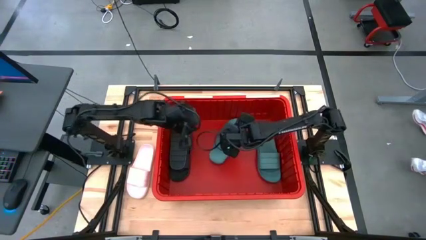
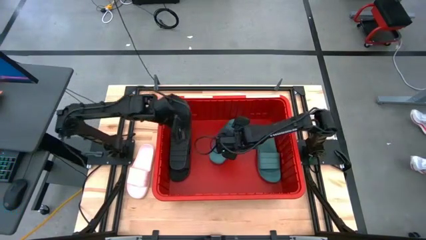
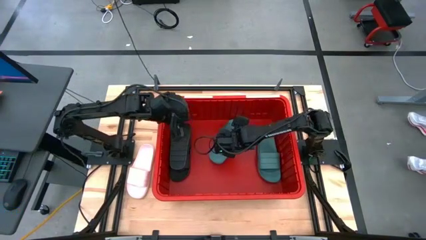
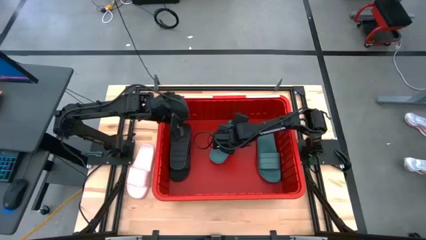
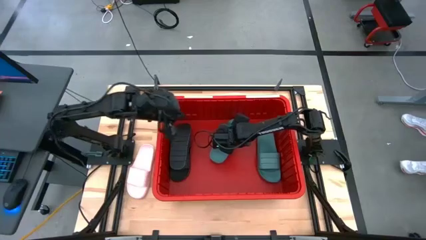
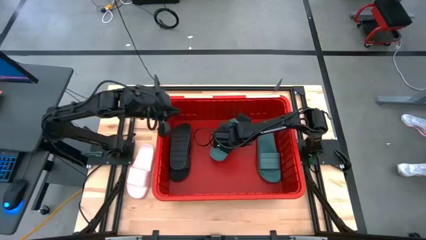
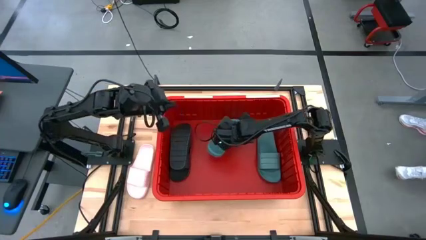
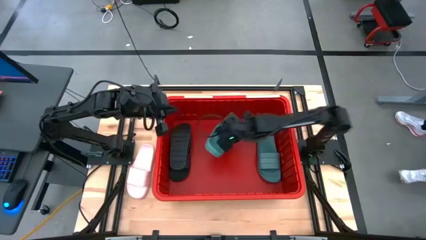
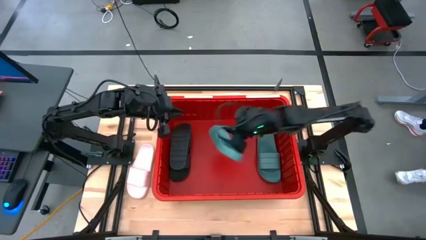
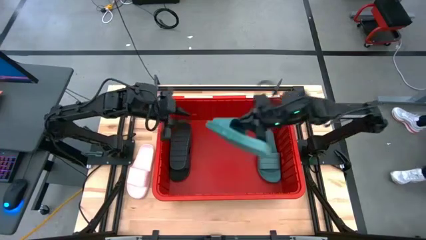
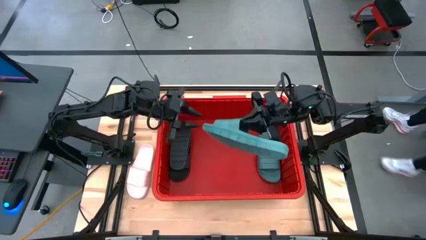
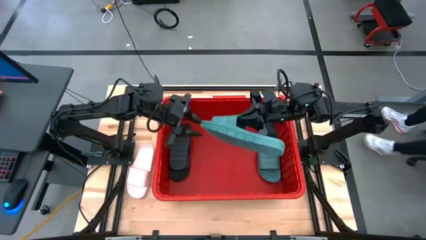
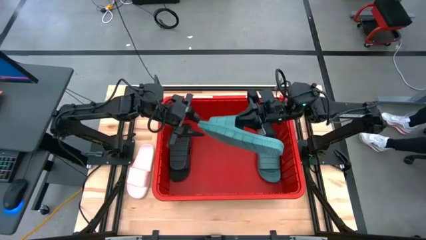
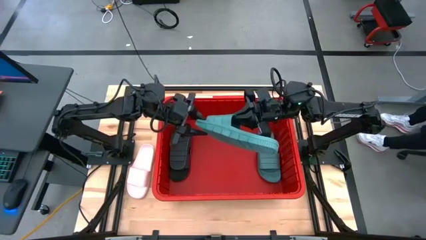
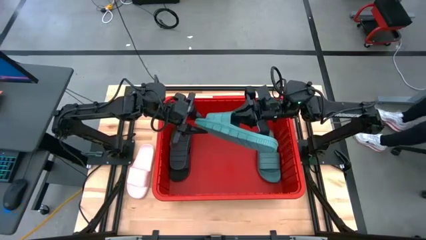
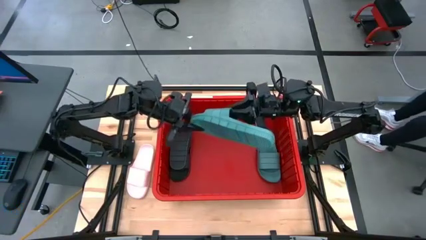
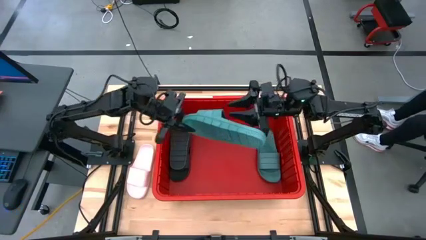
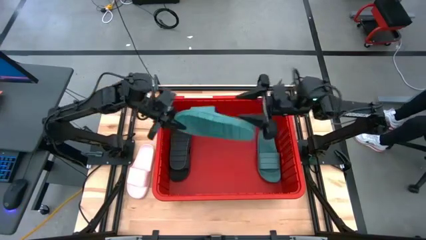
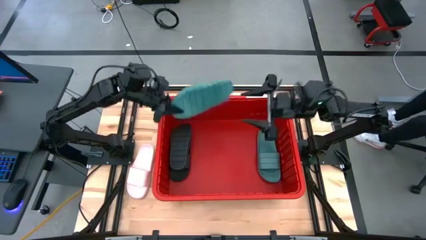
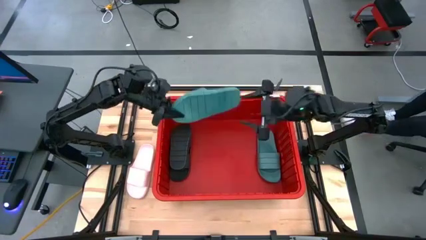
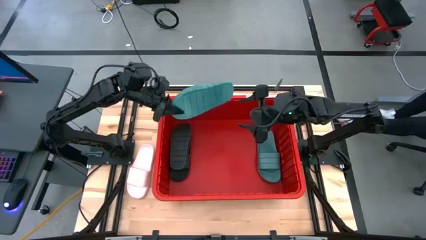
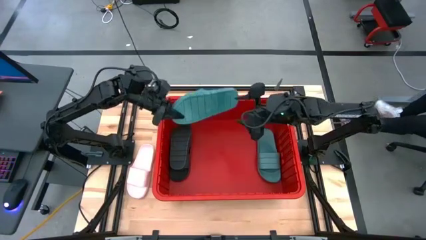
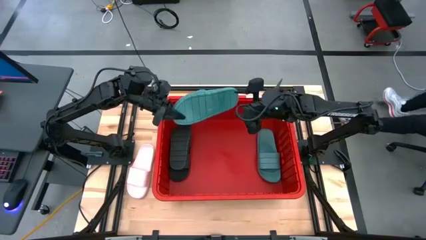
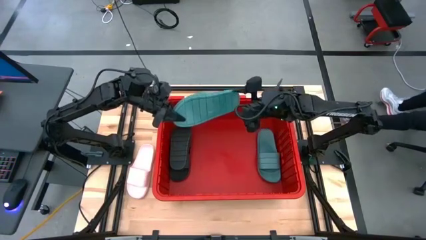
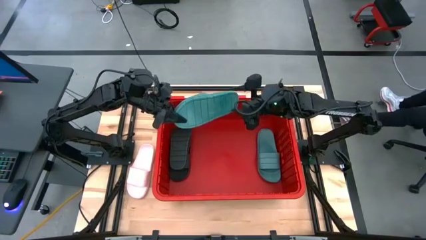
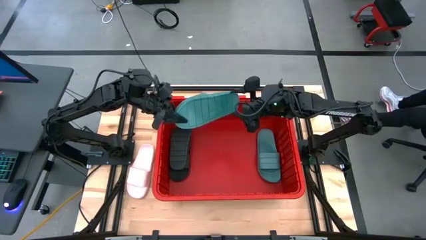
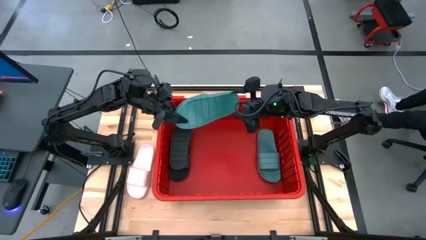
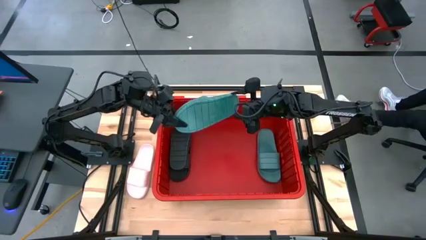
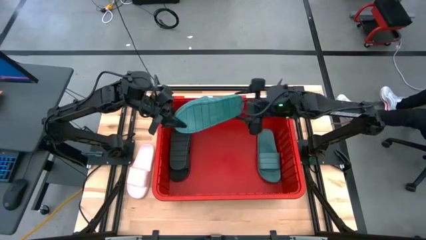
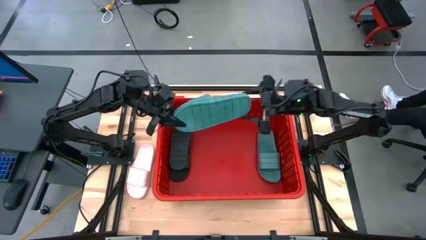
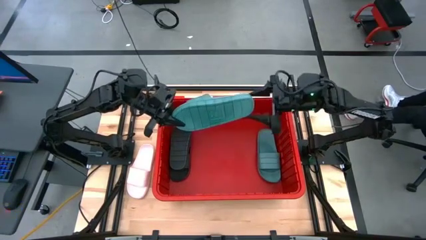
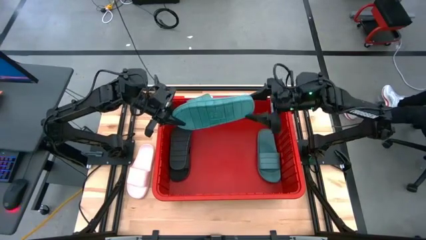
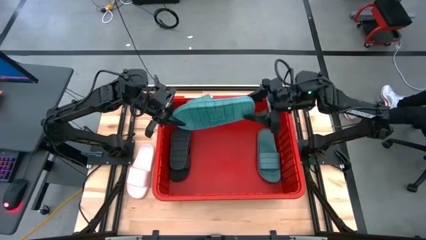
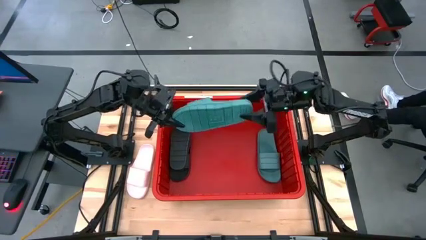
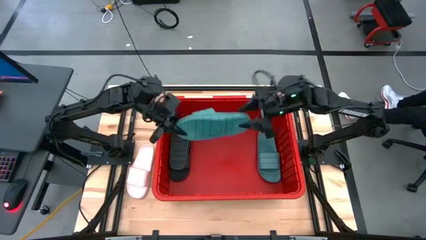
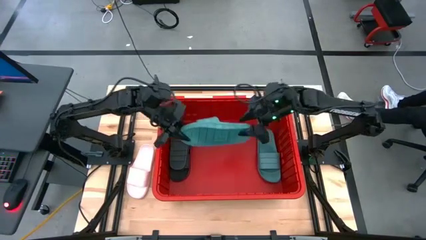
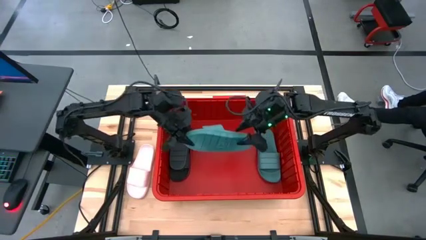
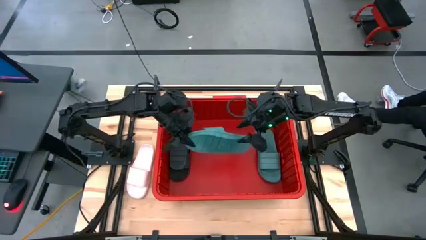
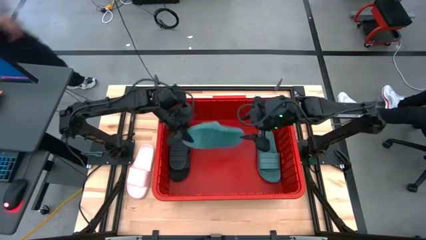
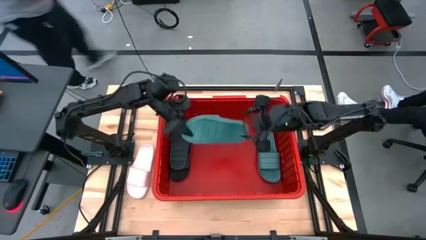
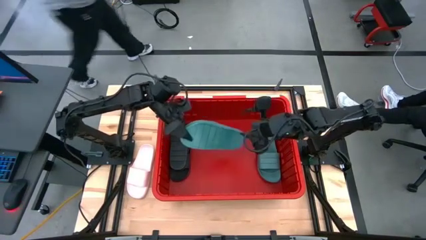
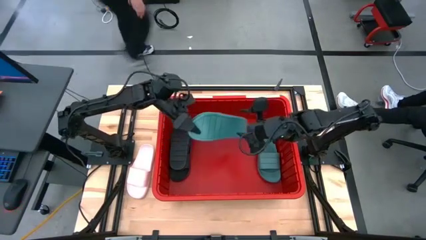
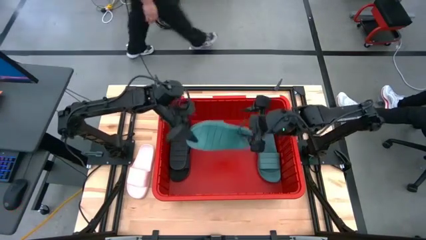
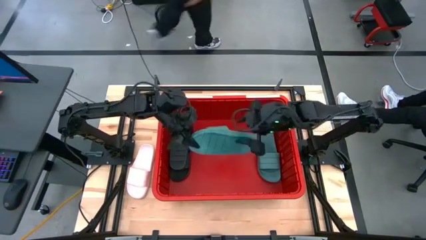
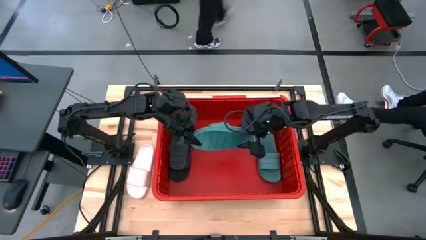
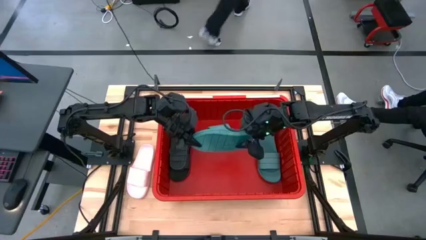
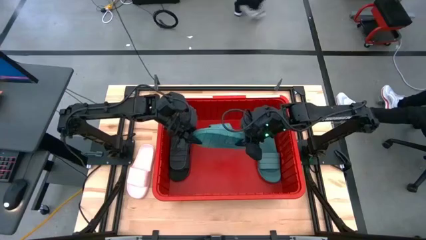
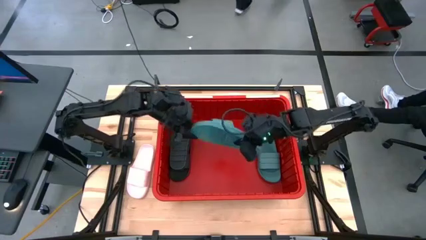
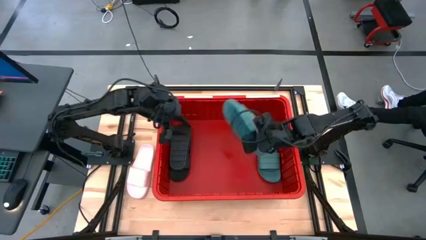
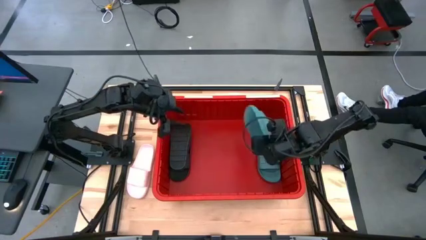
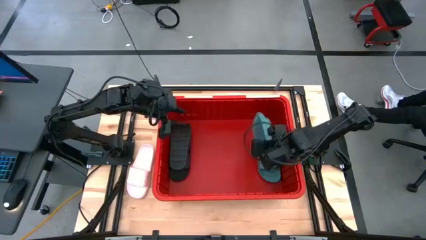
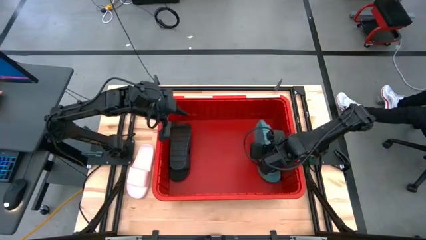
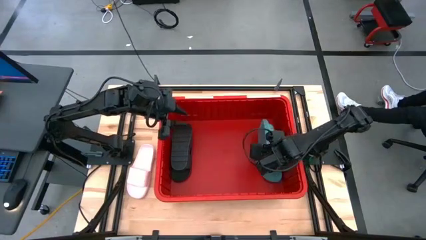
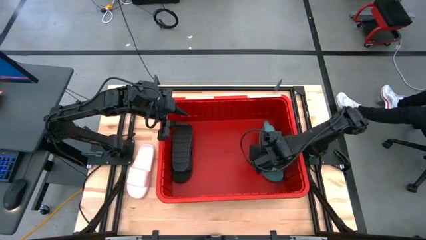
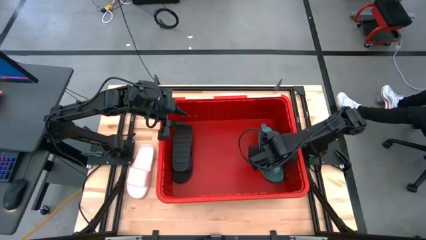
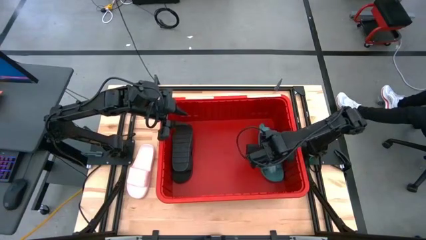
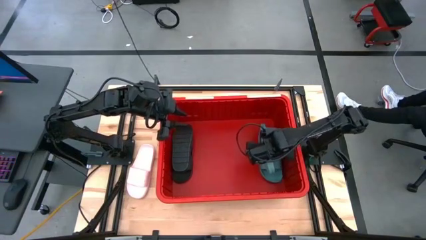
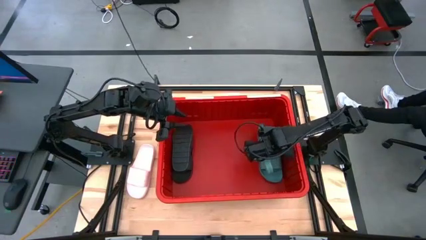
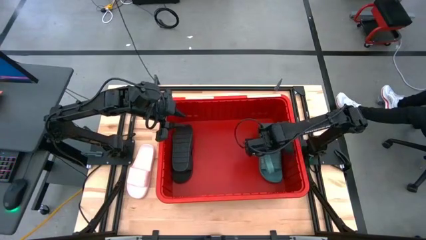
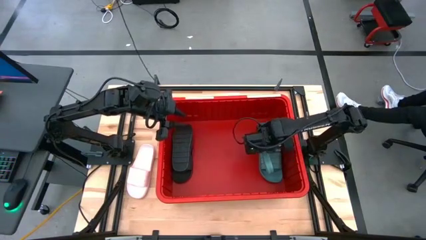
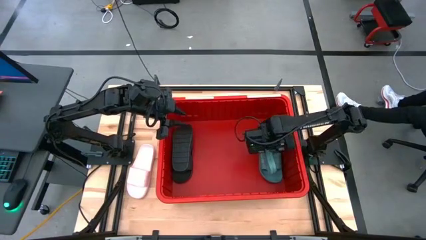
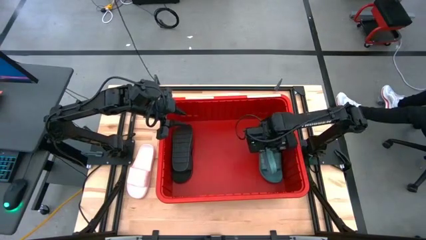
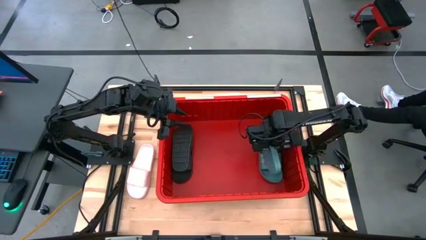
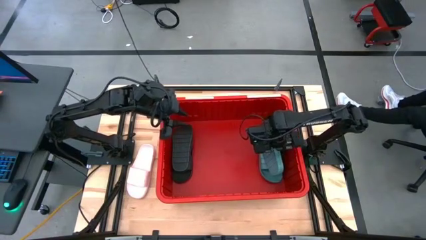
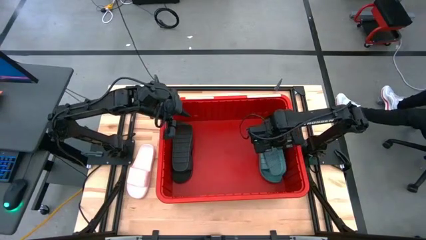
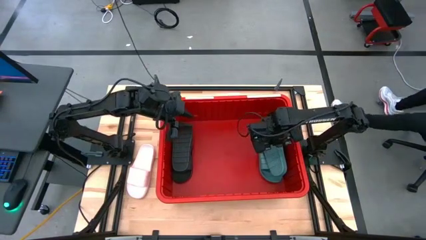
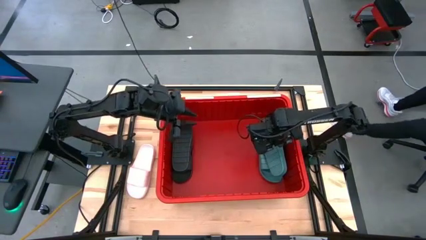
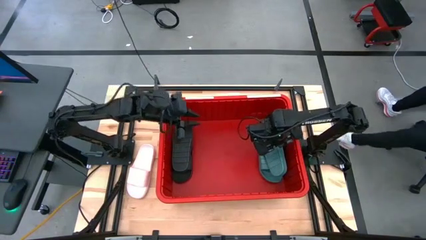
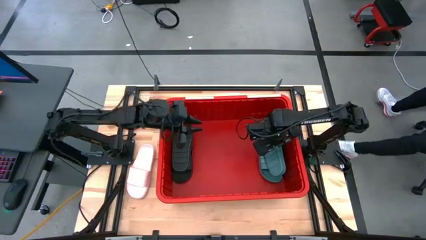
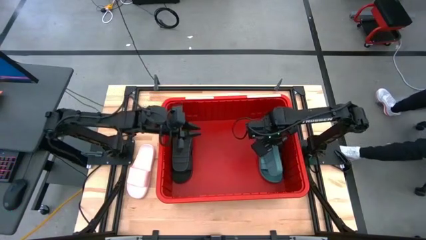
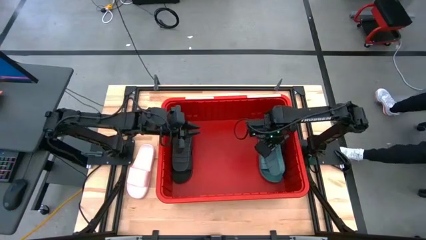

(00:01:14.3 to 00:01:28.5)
Task: Pick and place slides into bin
Put the green slide on top of the other green slide in the container

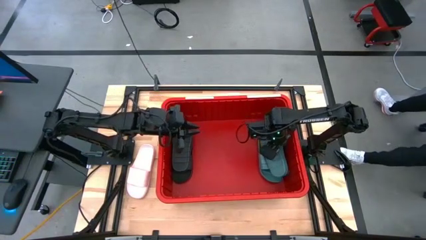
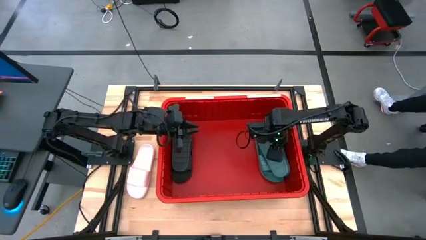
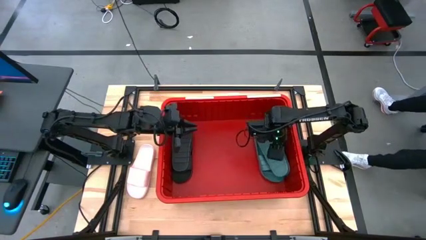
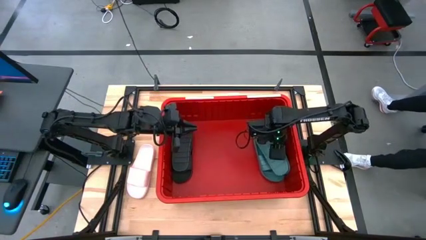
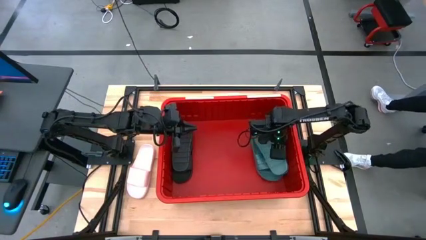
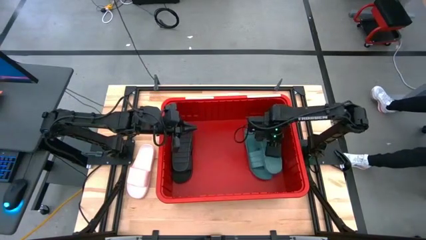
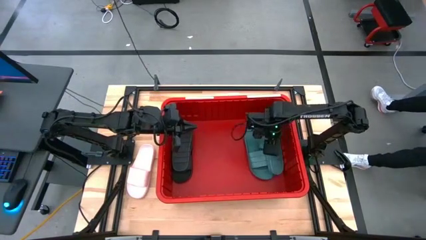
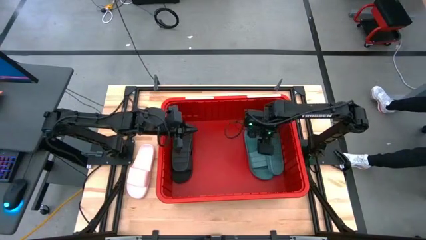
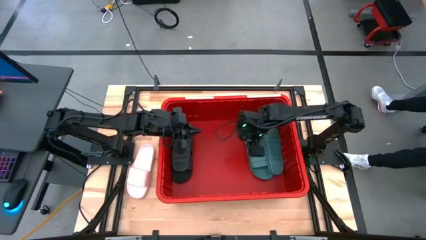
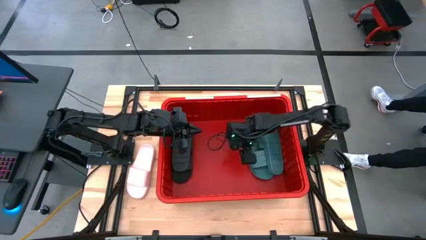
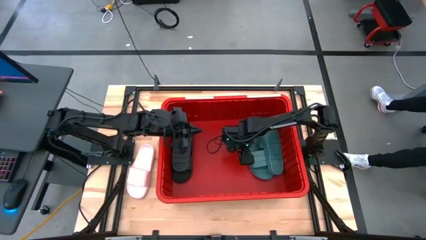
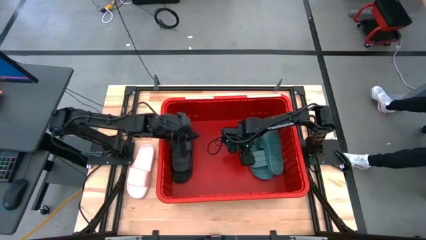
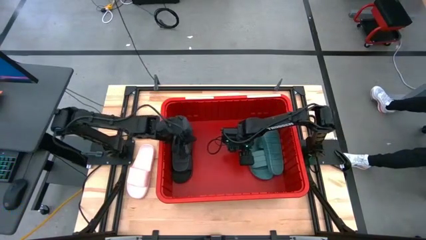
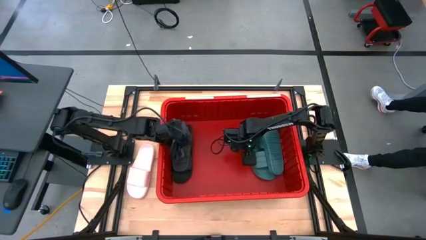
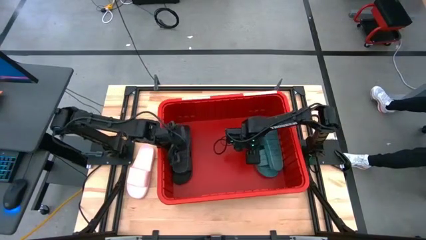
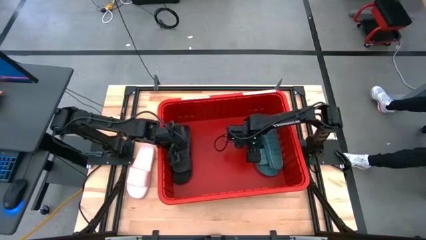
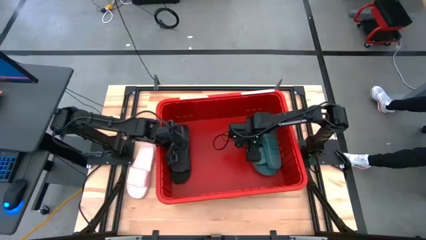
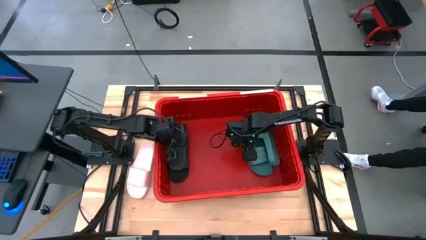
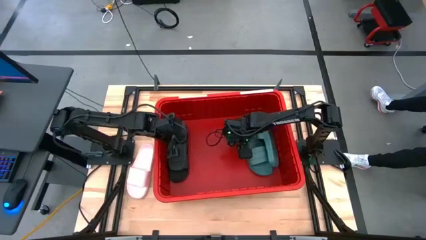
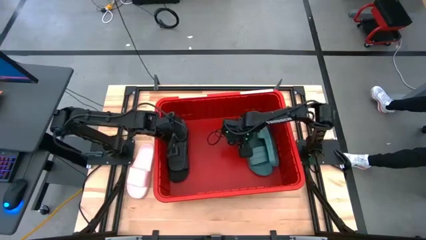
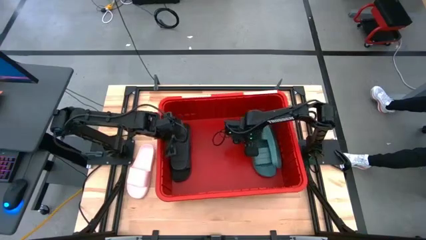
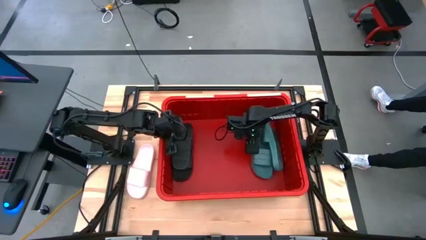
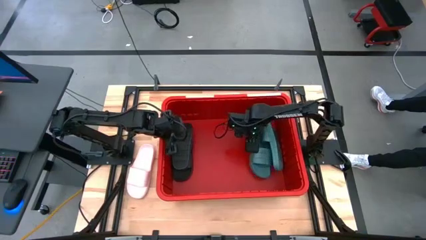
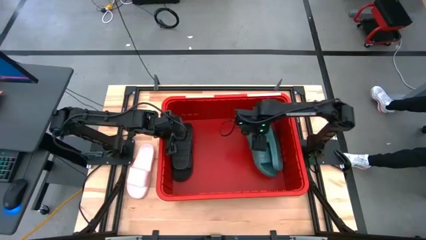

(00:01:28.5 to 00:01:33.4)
Adjust the bottom green slide in the container to align the stack
